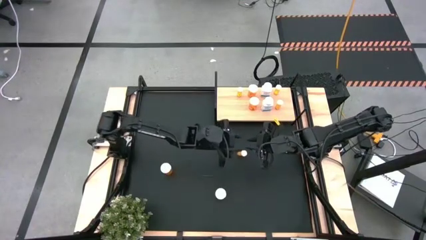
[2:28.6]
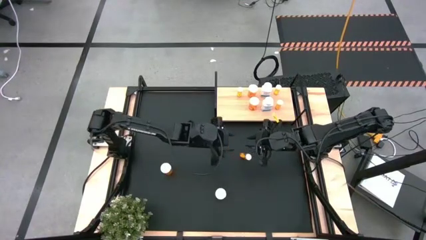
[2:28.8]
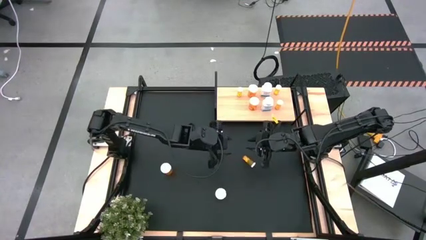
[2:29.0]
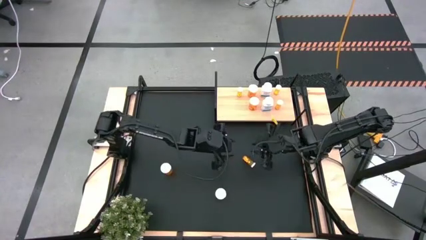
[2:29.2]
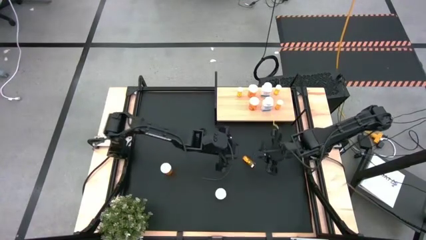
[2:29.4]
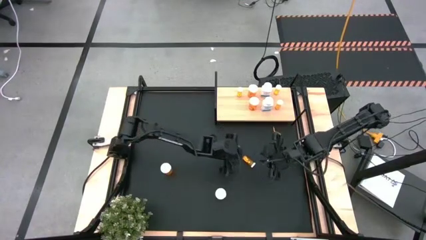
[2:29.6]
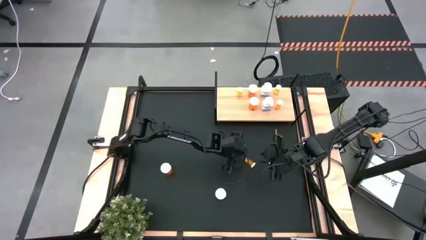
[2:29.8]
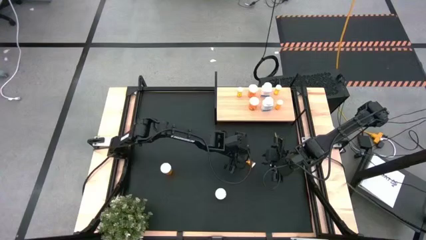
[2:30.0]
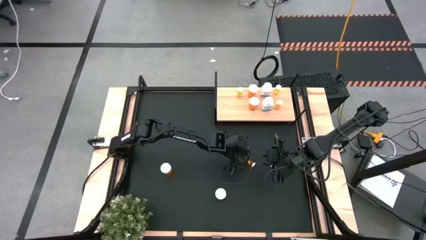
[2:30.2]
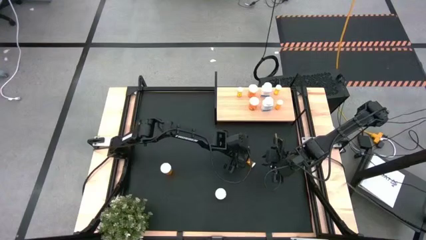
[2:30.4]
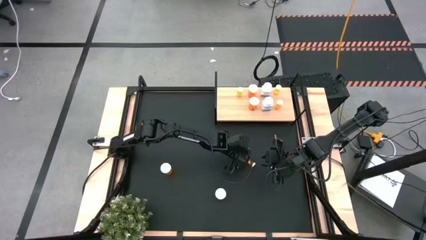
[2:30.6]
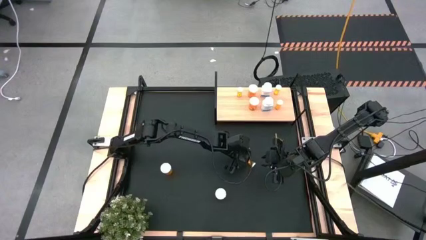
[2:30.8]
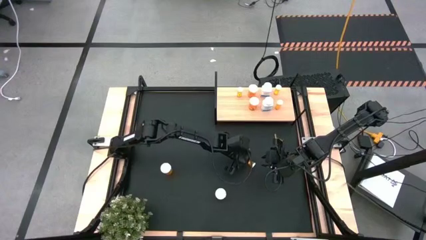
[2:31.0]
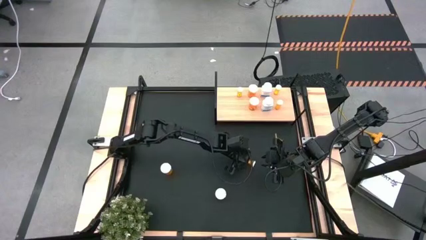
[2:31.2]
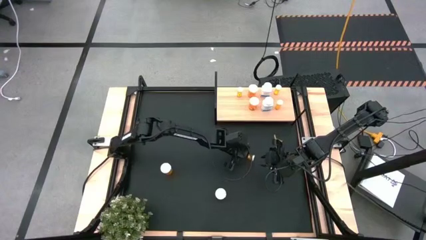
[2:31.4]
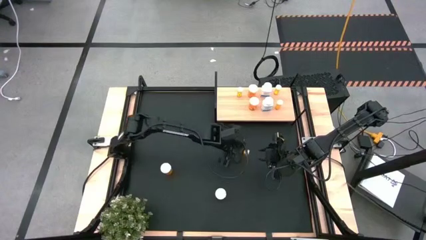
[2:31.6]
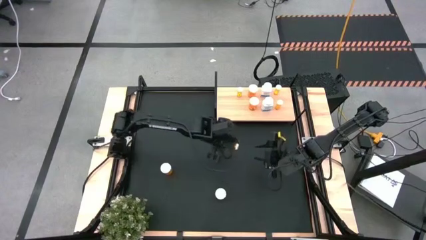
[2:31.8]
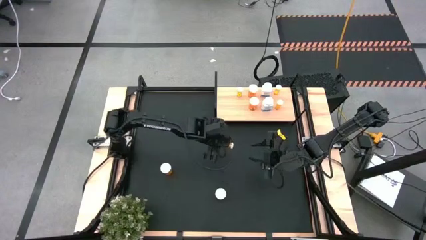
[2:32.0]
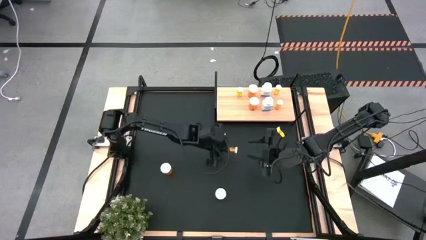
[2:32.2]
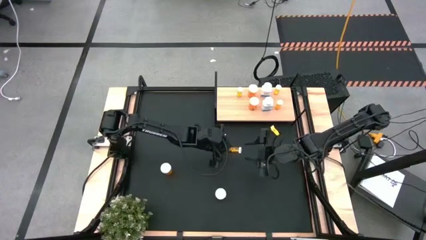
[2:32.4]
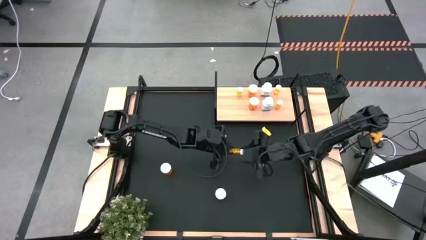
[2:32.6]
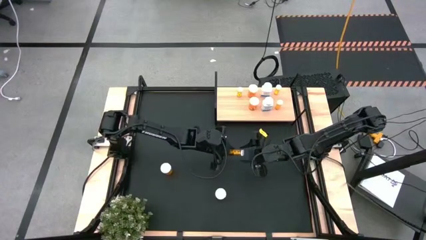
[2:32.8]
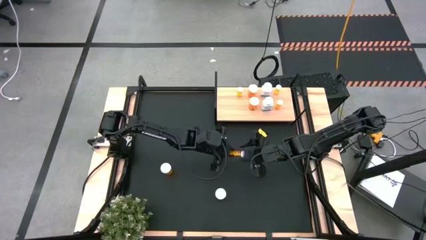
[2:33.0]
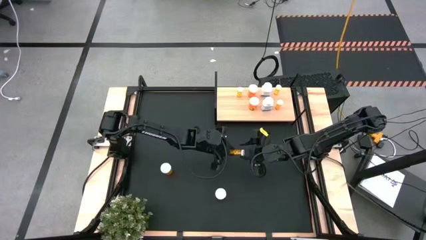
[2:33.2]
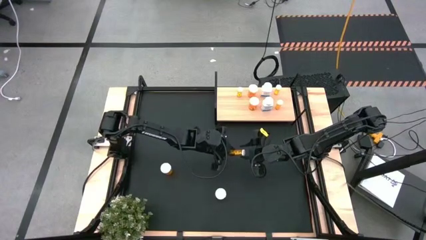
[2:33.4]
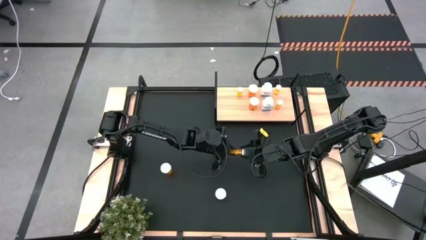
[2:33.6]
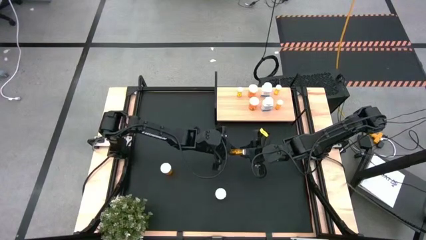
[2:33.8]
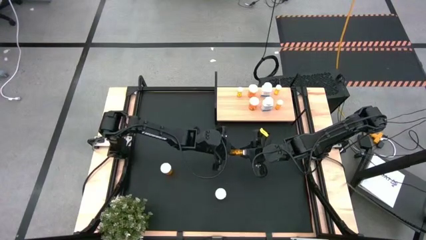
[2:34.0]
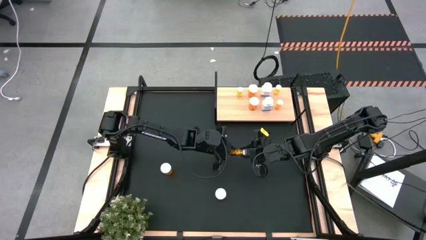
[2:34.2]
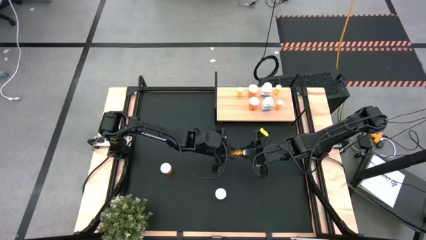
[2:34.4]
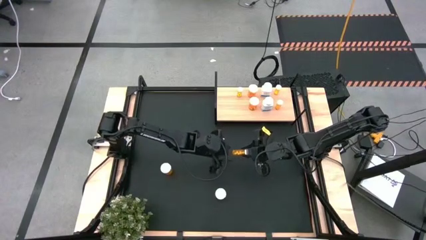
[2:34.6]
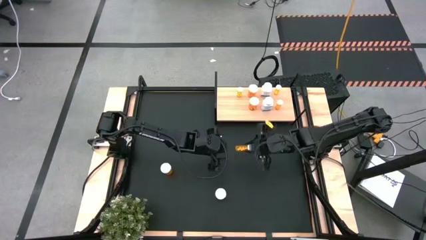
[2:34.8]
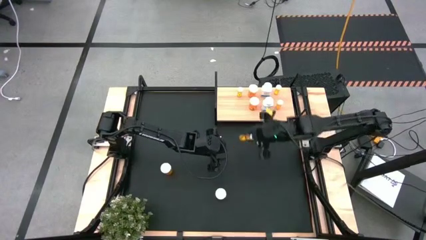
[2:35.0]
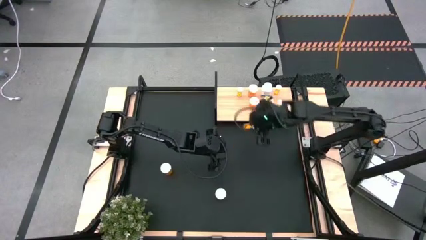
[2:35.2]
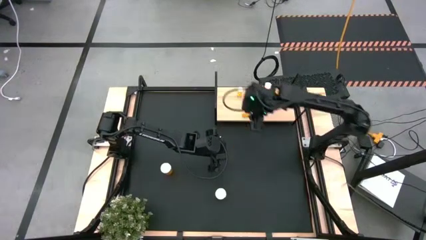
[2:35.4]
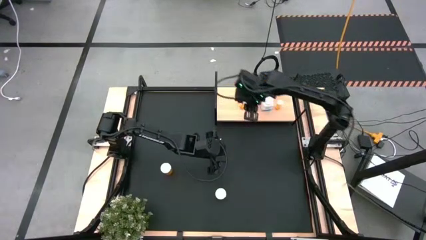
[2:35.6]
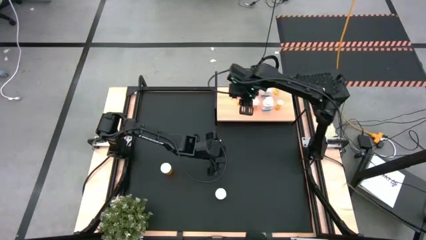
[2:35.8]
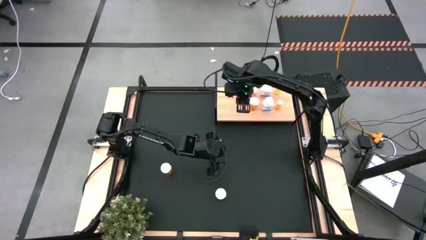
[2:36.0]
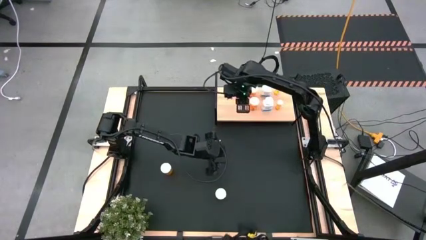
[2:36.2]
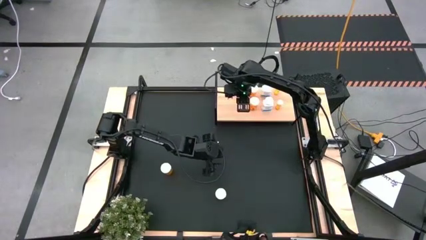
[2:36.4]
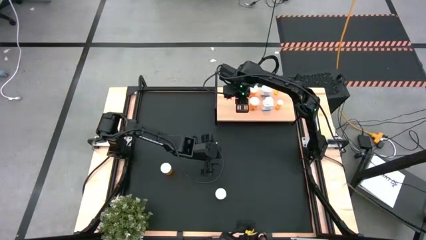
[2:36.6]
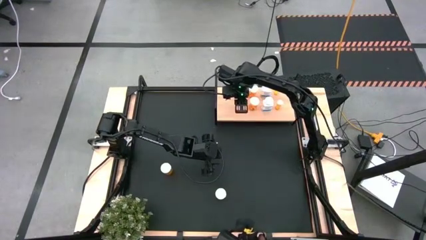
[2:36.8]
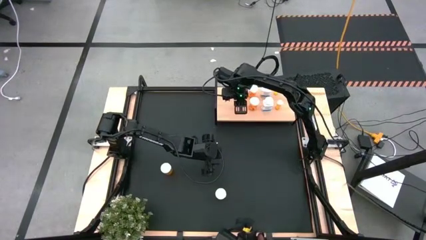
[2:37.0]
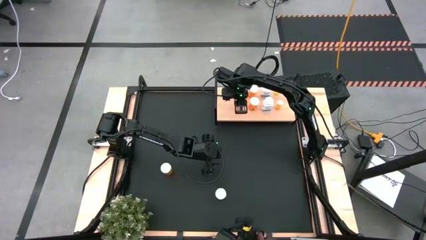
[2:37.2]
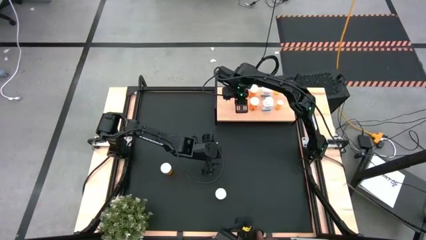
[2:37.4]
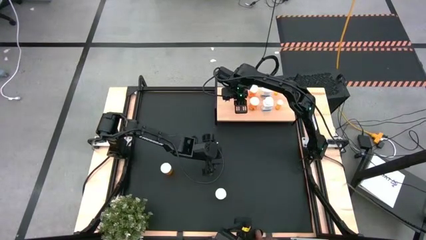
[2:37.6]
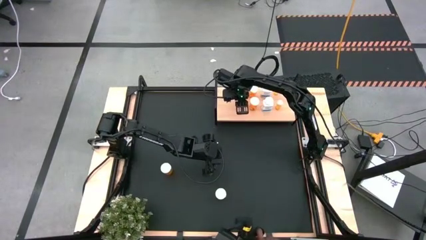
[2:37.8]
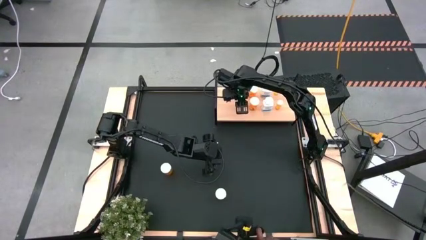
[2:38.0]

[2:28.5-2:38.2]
Task: Pick and place medicine bottles onto shelf by color
Put the small orange pill bottle on the shelf aligned with the other small orange pill bottle

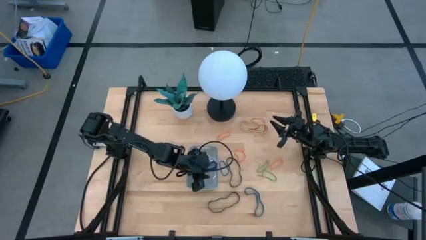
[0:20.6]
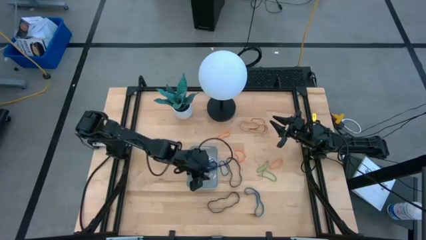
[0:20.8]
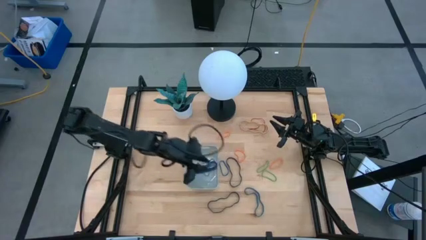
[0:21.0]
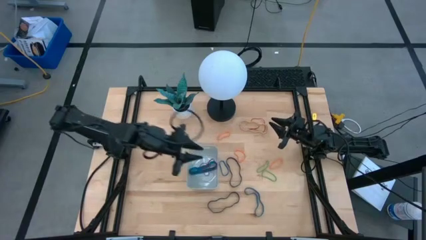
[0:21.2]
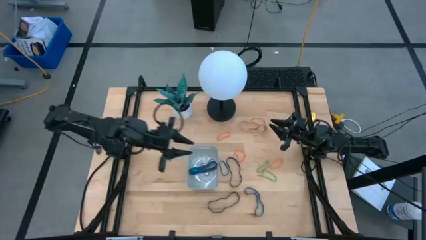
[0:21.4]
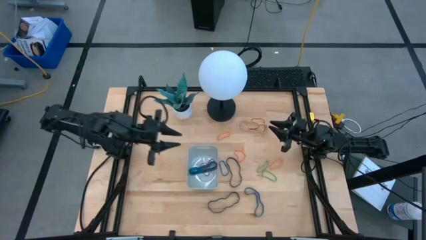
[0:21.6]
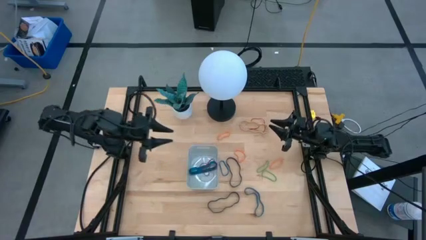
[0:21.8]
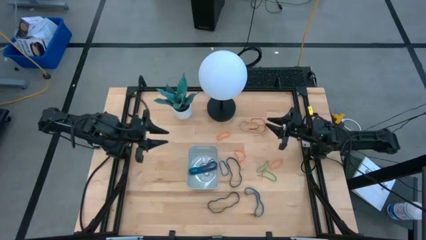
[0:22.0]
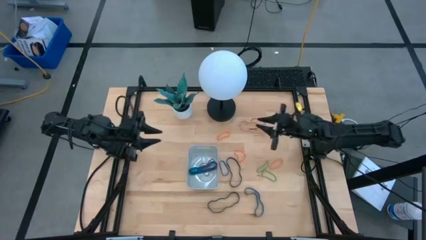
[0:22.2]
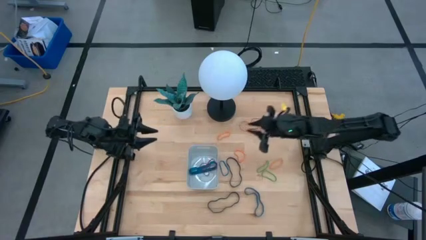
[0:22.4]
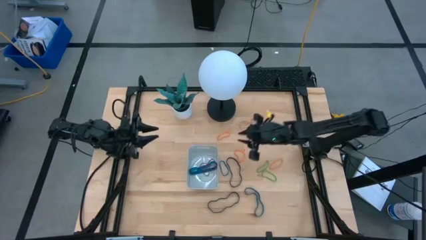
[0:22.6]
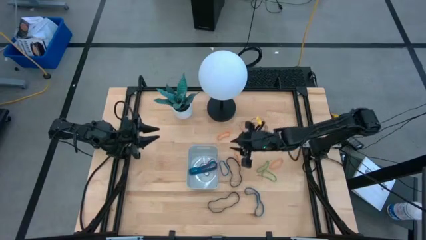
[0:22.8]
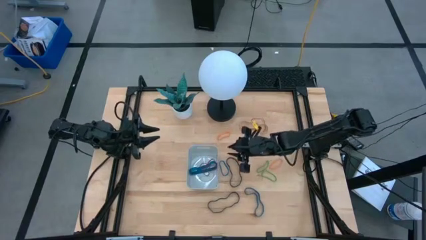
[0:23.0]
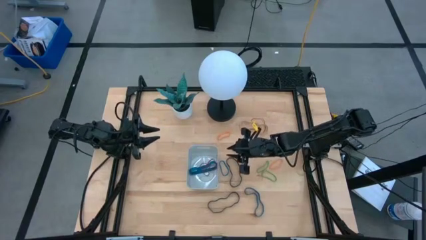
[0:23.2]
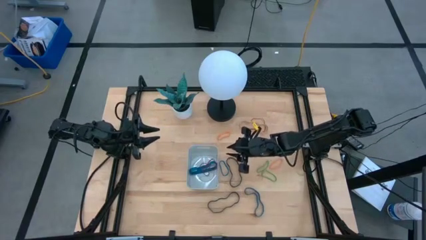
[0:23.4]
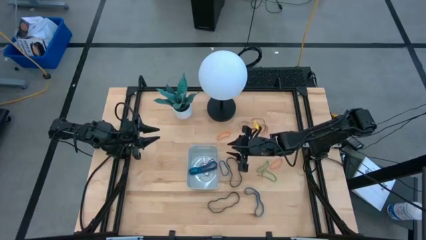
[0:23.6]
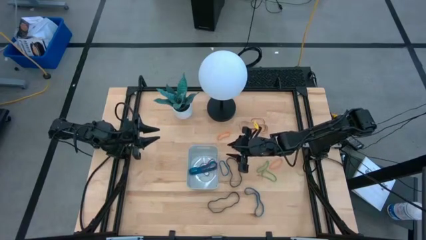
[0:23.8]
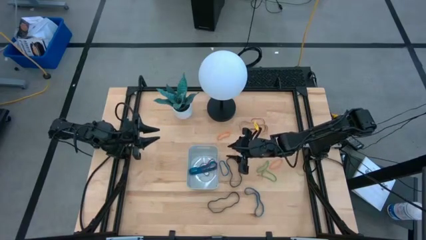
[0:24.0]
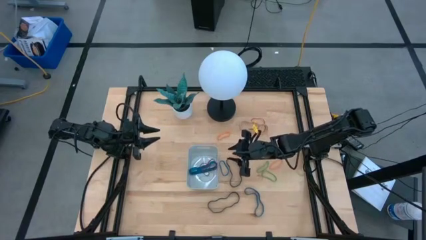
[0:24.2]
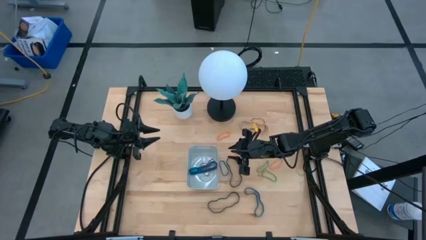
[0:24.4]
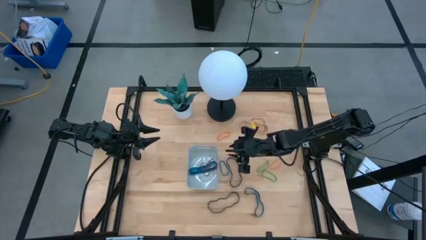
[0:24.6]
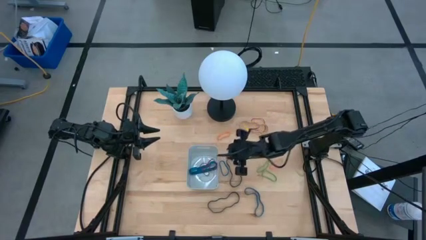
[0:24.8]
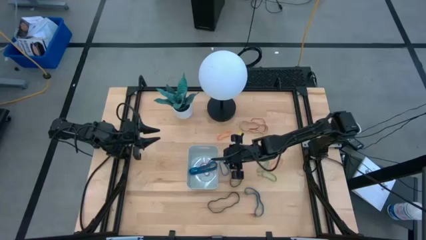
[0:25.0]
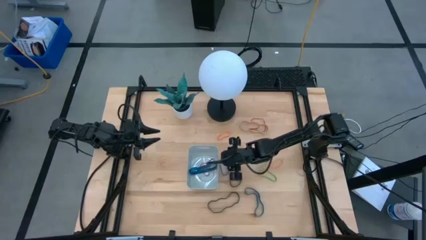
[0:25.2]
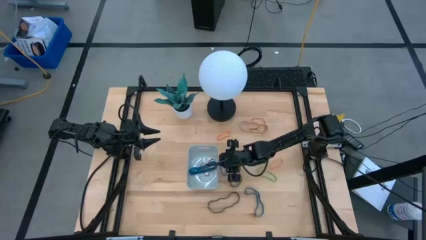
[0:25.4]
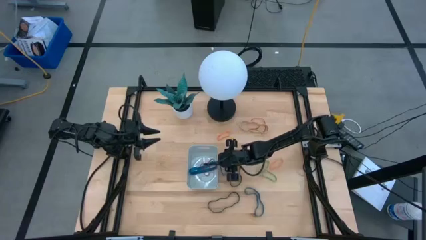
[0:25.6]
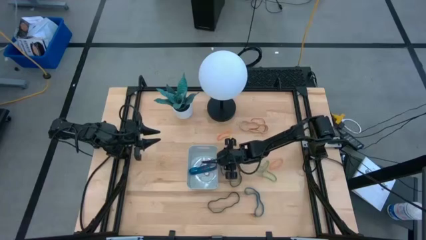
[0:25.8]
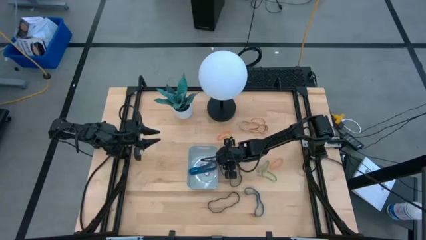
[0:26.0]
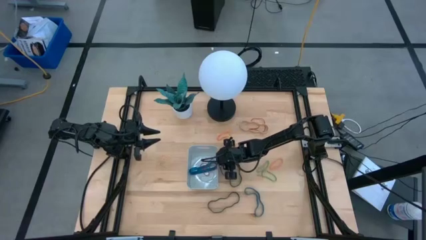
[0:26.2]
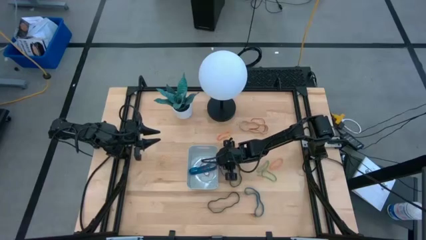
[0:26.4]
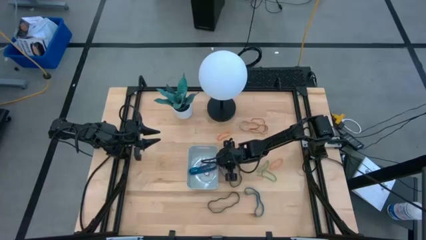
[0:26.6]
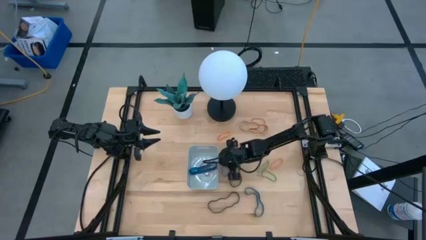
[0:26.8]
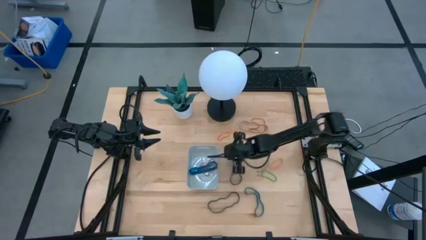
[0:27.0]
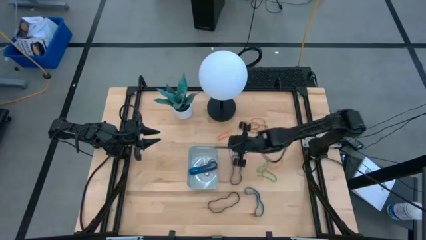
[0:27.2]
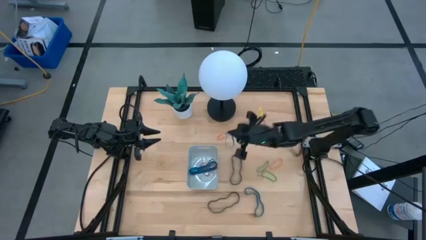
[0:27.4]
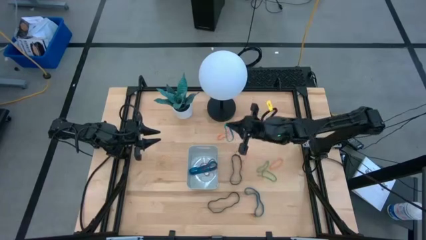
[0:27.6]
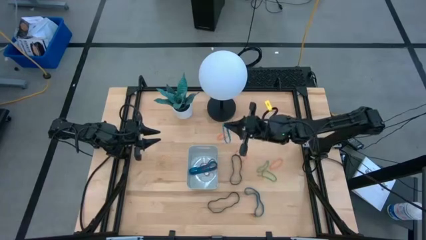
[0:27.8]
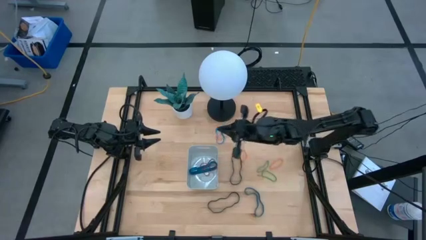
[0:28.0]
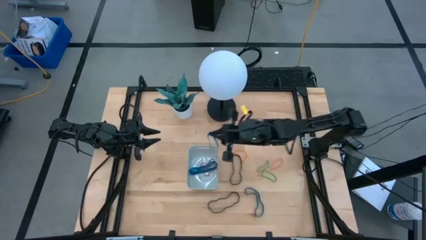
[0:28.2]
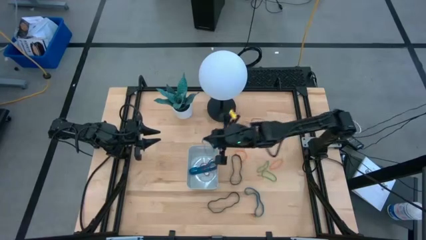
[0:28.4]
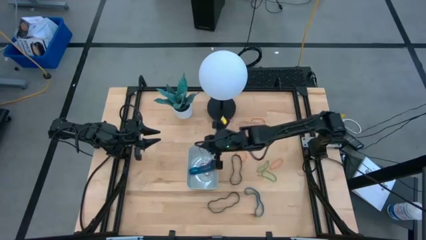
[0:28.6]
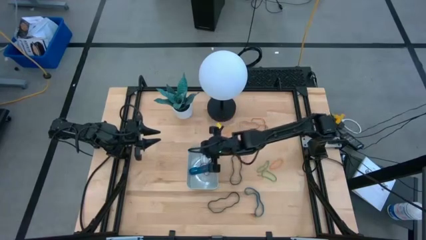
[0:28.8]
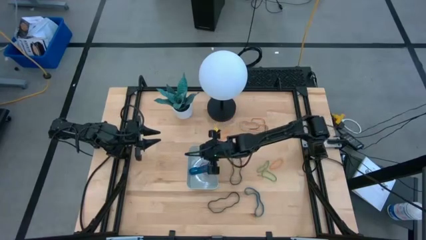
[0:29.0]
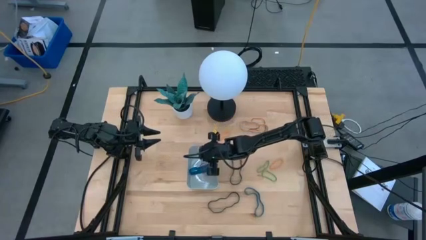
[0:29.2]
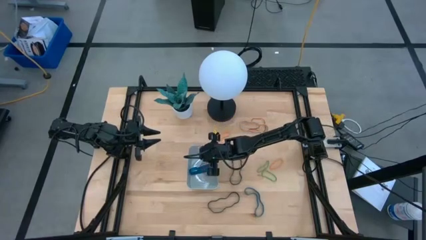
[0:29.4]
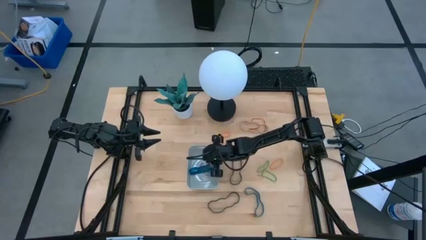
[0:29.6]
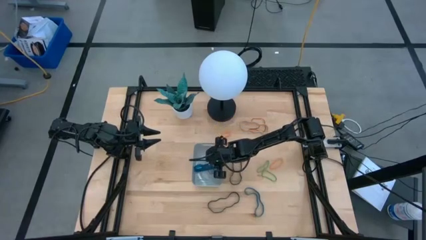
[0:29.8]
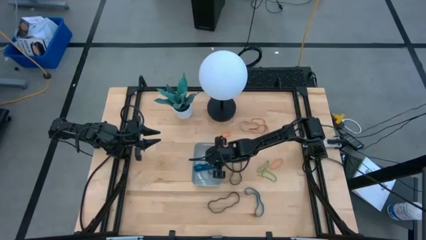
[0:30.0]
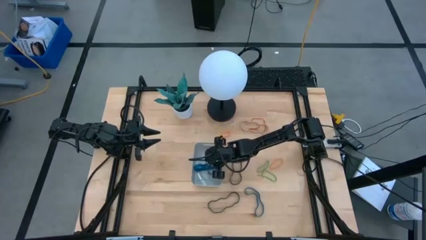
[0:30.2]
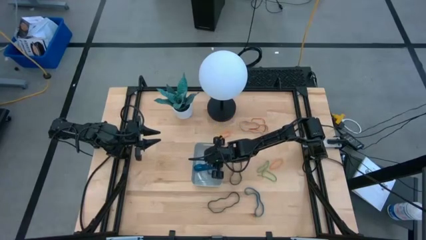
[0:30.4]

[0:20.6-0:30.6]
Task: Pick and place rubber bands into bin
Put the small blue rubber band into the gray bin
